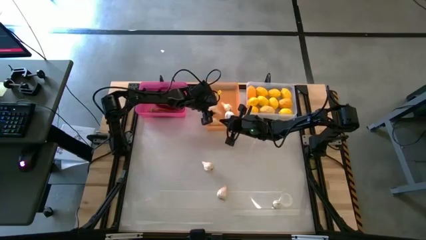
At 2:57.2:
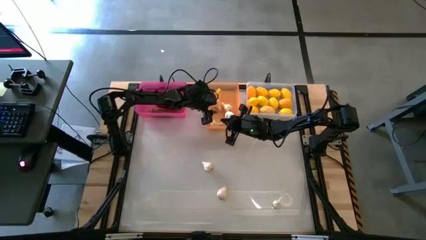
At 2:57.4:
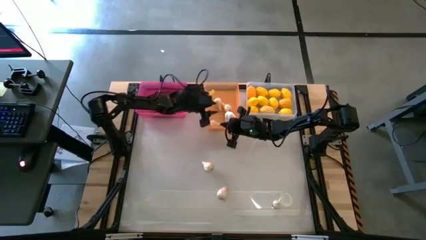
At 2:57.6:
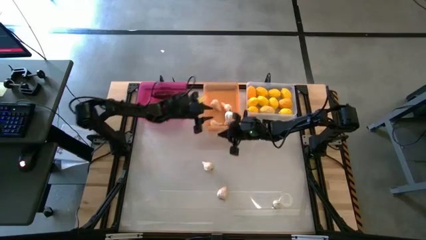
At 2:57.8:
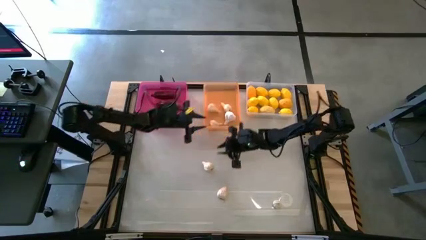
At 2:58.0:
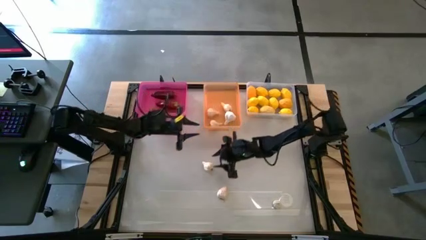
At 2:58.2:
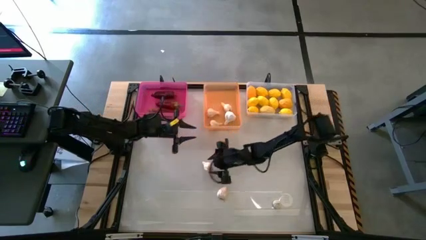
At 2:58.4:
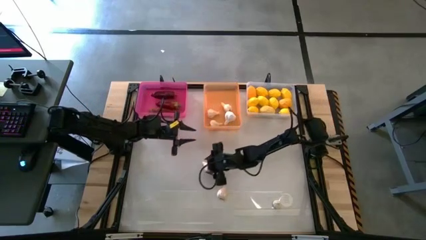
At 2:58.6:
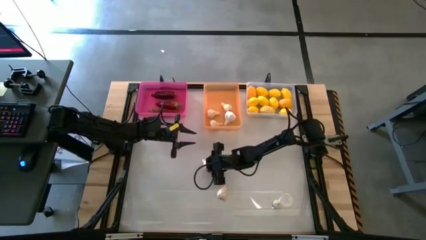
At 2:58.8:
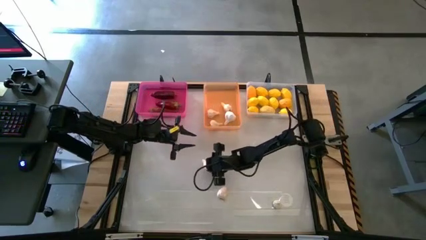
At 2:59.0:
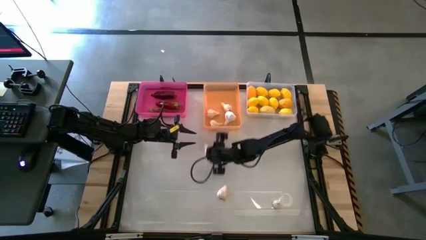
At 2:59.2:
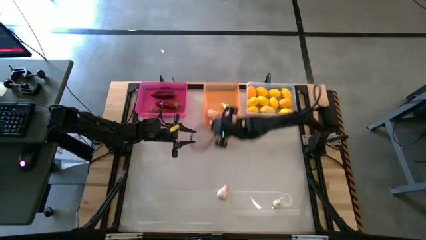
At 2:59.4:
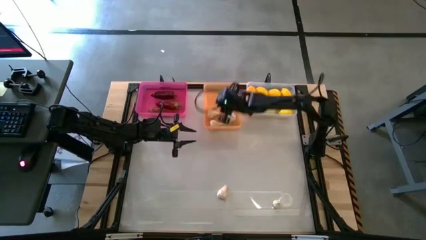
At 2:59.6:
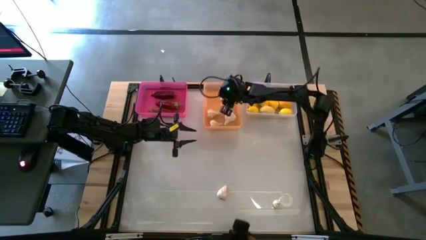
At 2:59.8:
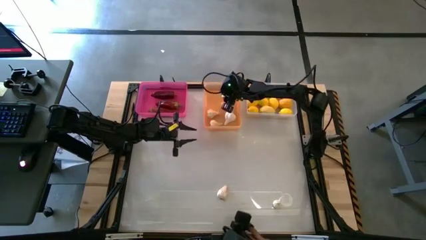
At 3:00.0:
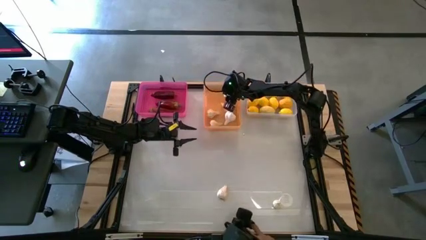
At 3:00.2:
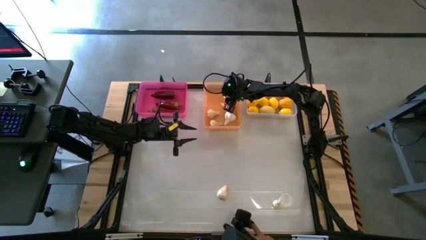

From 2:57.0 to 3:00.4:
Task: Sort produce into baskets
Put the white garlic into the orange bin

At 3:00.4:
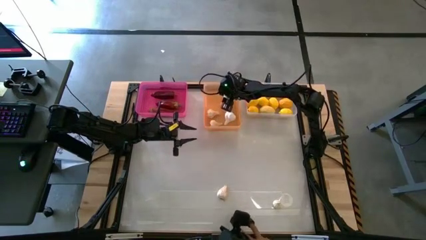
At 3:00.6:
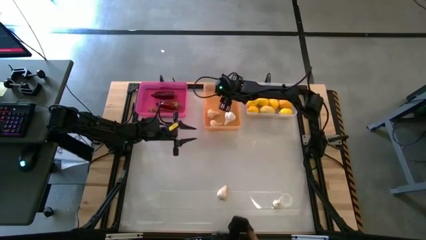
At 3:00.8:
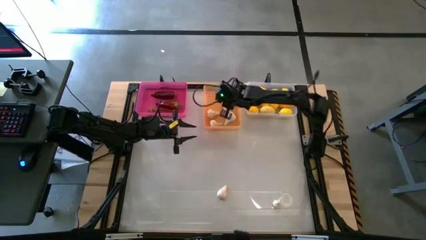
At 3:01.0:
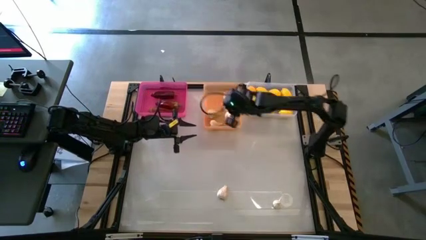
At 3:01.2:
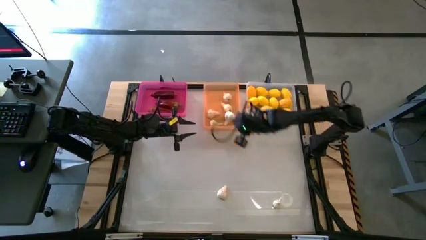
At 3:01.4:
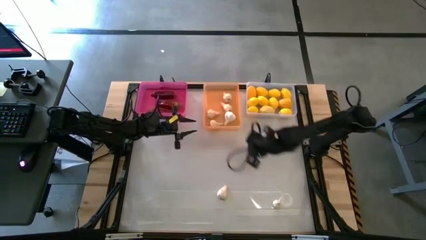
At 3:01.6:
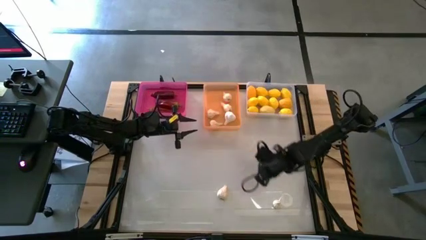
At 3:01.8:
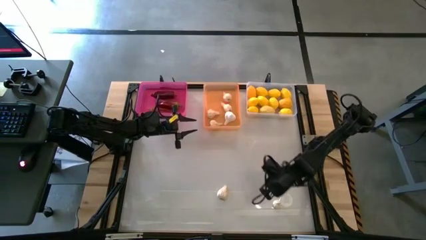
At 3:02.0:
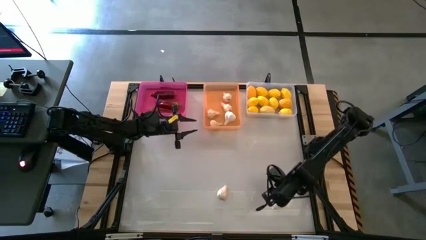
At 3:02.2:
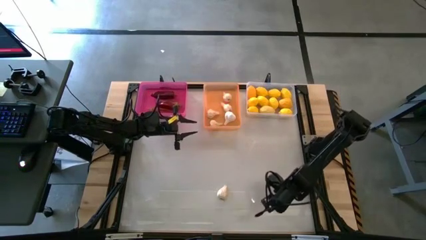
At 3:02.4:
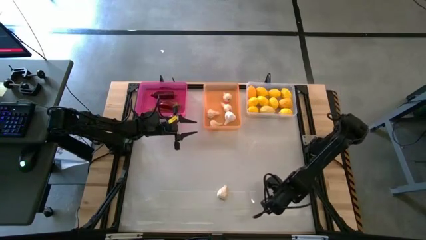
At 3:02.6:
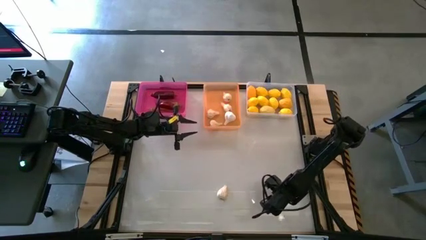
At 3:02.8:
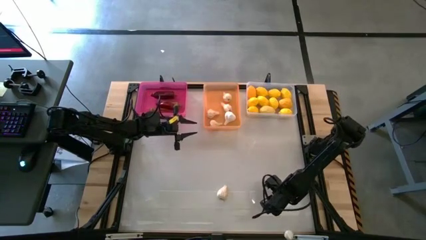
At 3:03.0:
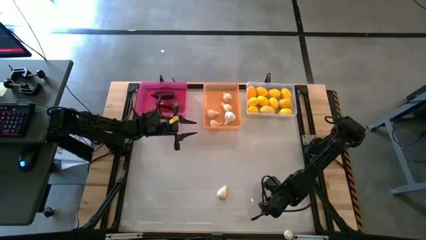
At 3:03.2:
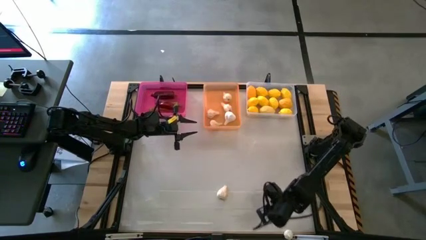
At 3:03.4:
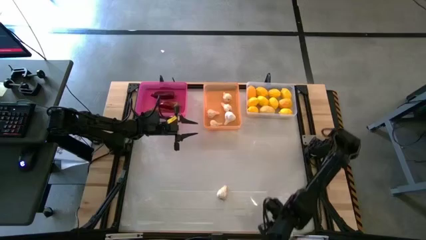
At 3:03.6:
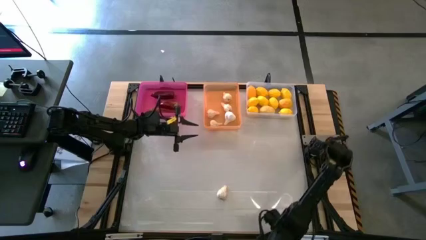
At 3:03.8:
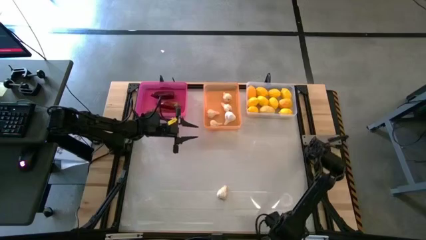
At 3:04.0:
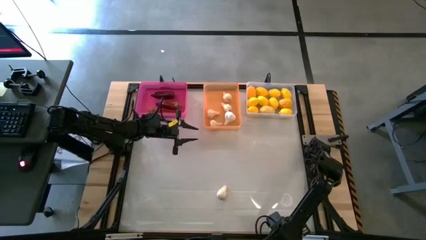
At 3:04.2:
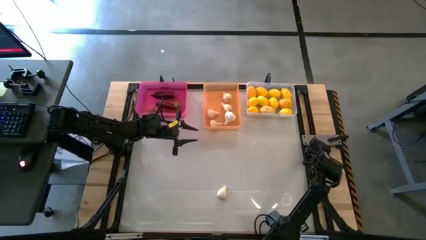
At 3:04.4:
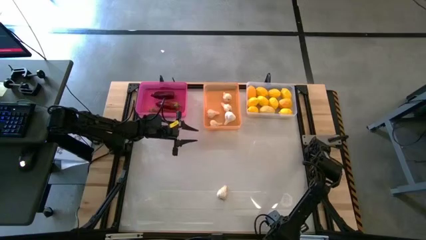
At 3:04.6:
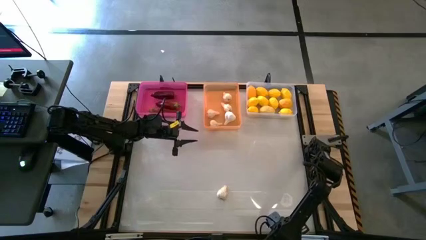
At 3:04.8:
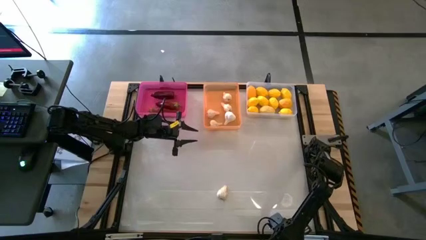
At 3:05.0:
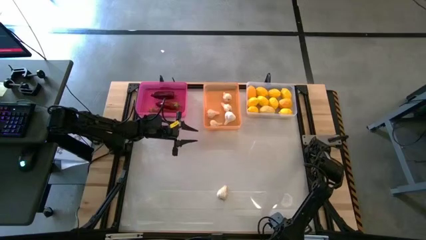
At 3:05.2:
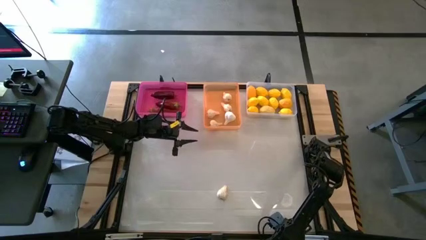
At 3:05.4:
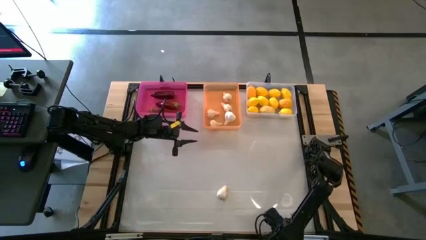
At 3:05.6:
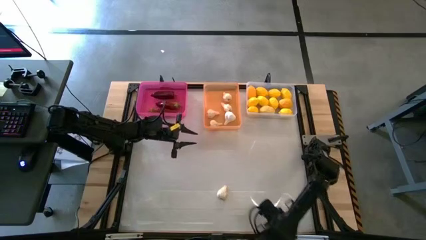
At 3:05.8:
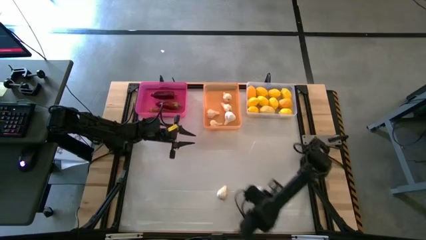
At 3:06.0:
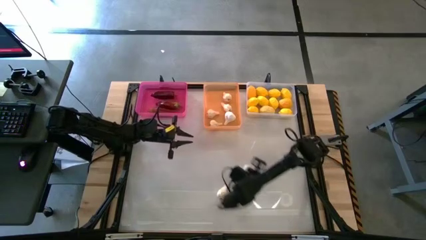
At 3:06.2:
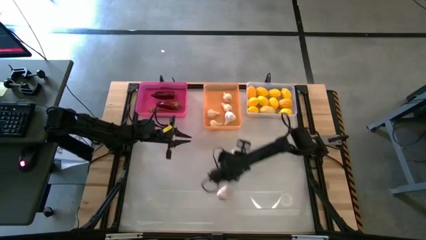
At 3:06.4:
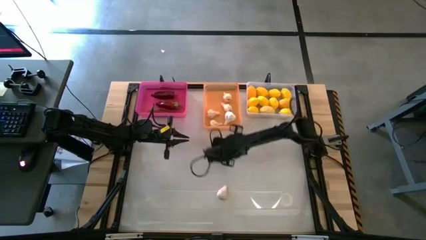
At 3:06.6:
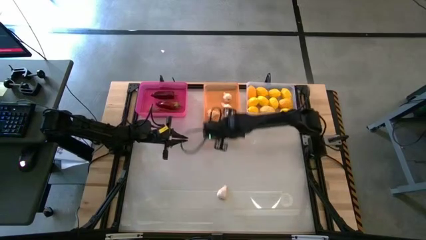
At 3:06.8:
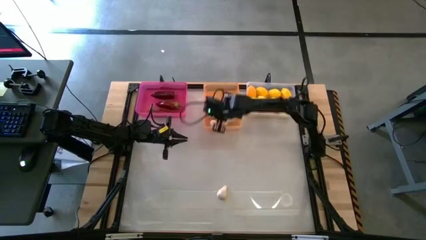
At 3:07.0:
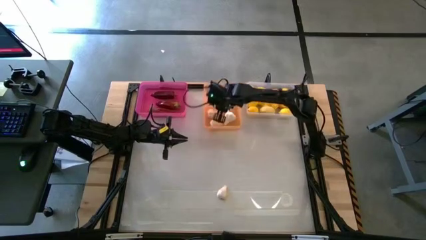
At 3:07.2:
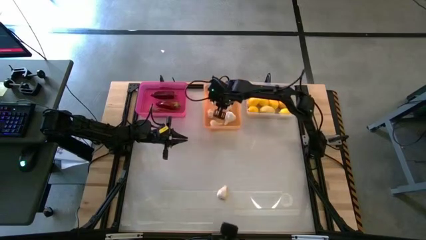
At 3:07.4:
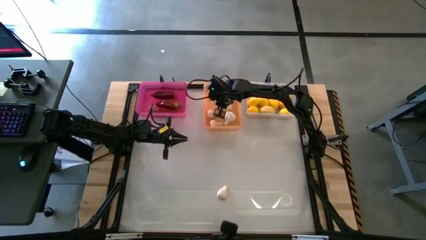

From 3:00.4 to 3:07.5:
Put the white garlic into the orange bin

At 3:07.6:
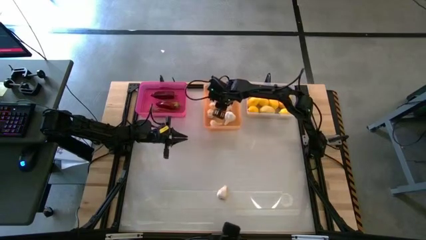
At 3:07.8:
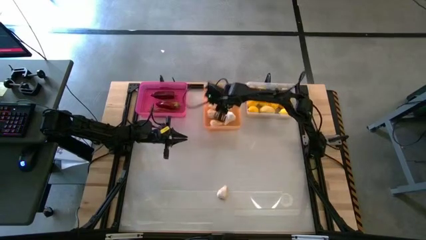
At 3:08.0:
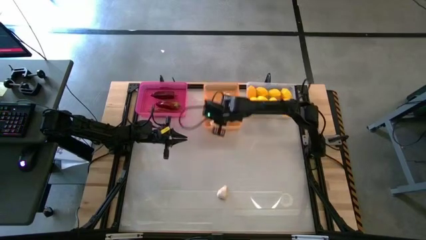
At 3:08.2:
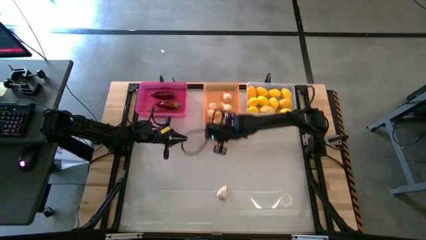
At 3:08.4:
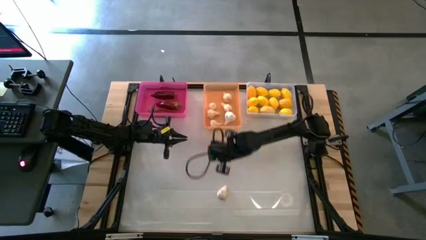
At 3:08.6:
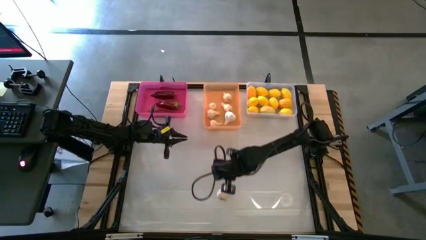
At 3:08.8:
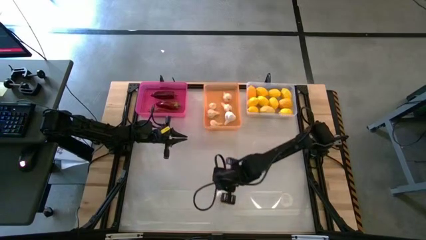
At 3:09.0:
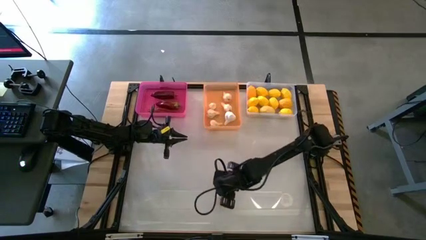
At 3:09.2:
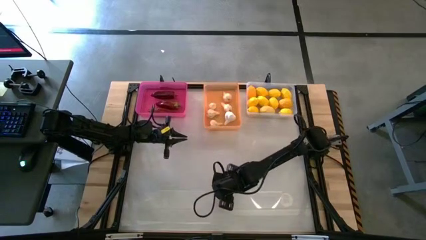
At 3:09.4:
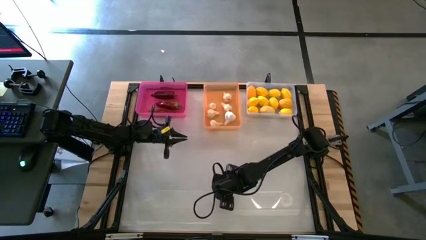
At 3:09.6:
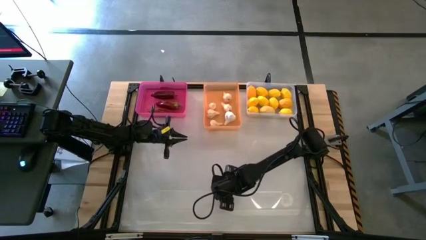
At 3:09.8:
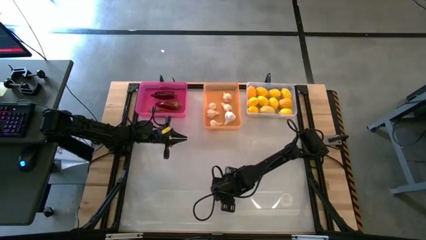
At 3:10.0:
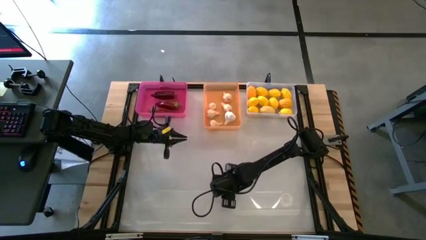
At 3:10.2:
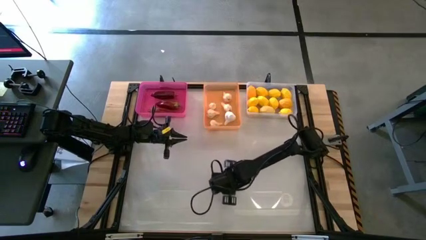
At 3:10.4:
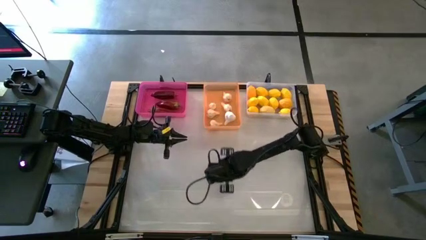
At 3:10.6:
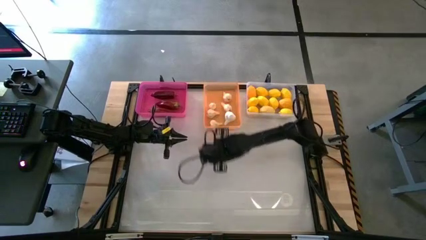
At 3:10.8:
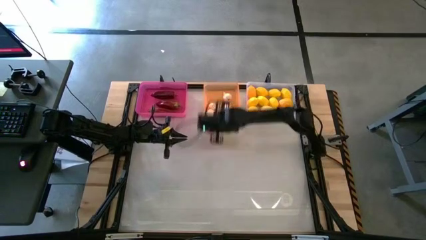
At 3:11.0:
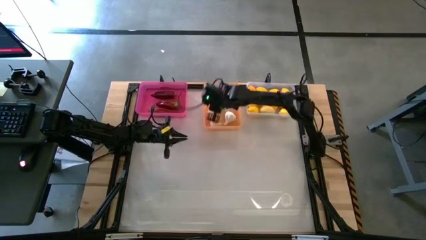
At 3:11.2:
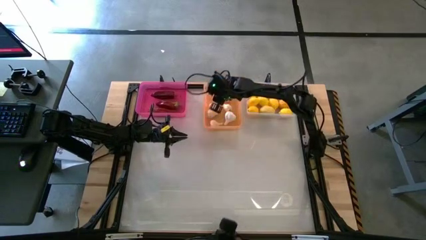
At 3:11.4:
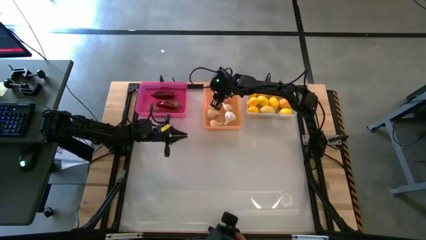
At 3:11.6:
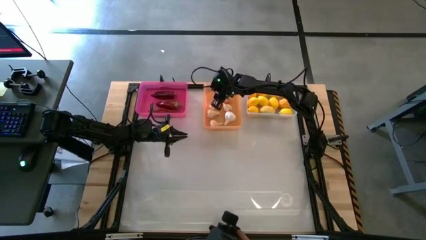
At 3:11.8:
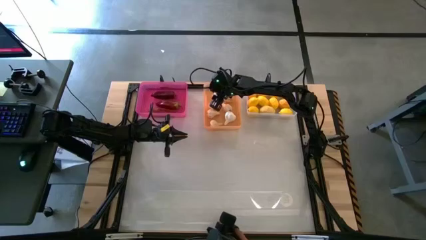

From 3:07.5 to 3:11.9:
Put the garlic into the orange bin

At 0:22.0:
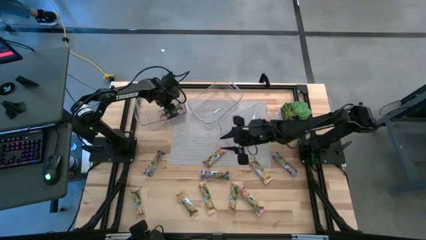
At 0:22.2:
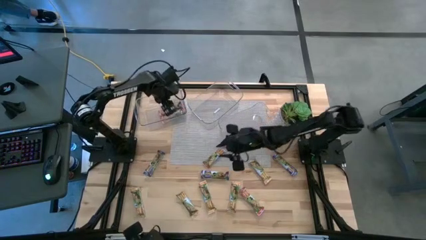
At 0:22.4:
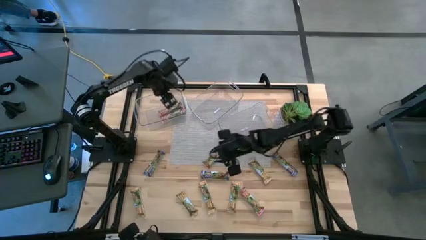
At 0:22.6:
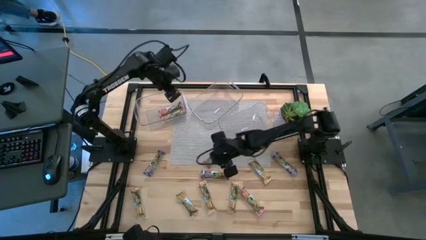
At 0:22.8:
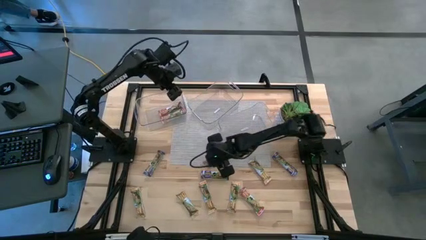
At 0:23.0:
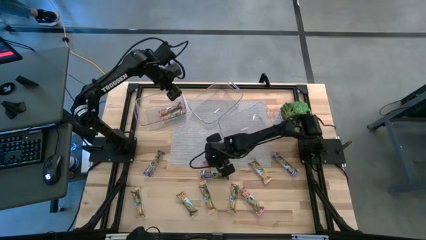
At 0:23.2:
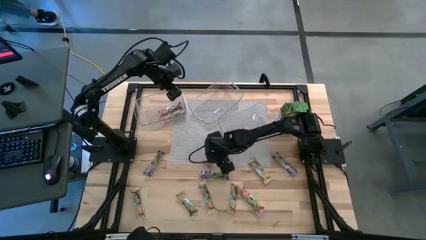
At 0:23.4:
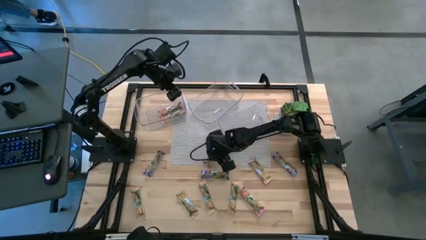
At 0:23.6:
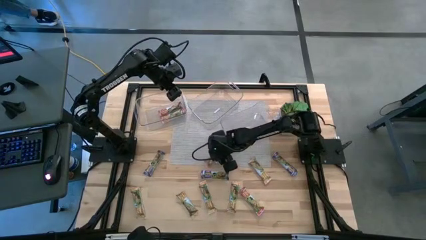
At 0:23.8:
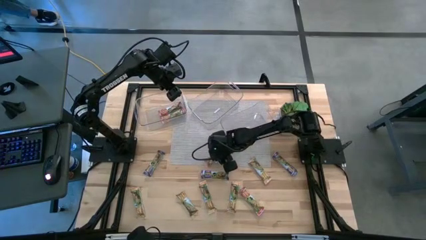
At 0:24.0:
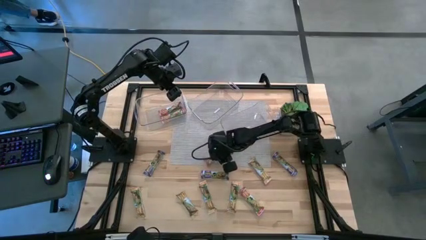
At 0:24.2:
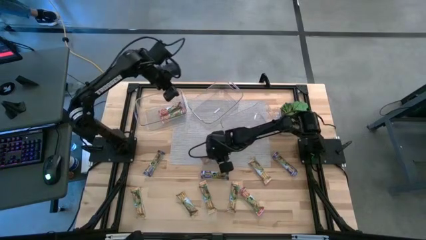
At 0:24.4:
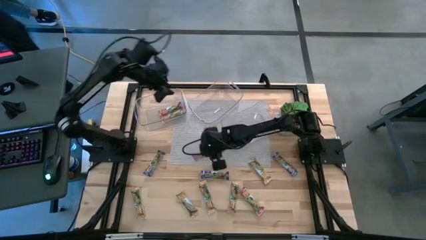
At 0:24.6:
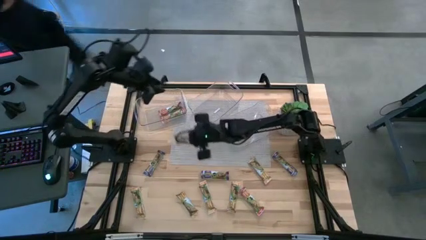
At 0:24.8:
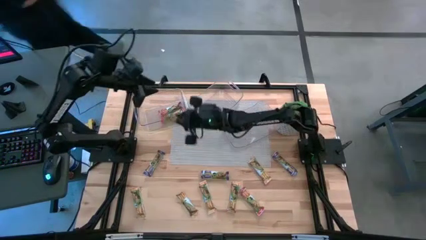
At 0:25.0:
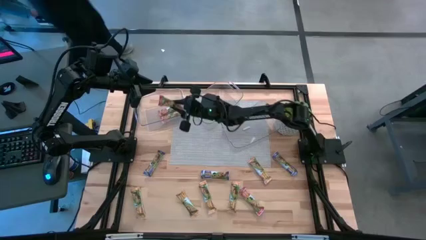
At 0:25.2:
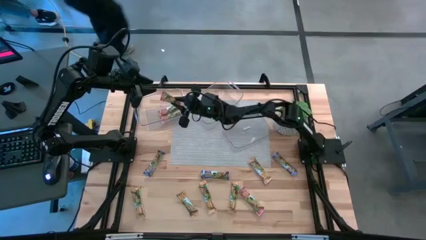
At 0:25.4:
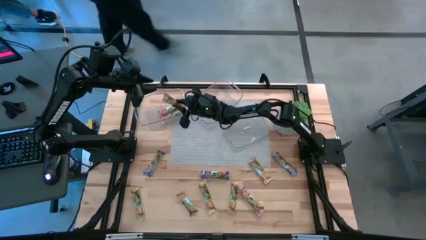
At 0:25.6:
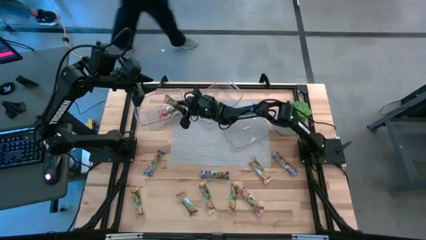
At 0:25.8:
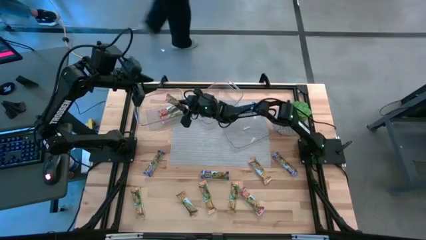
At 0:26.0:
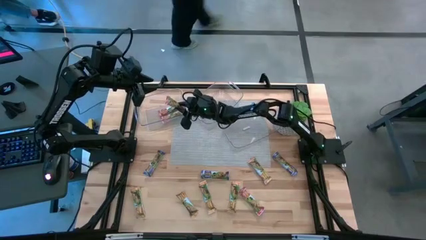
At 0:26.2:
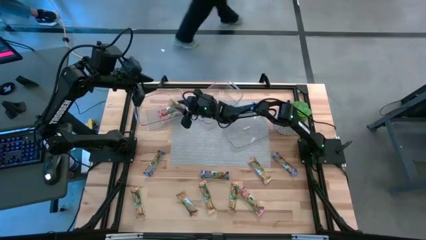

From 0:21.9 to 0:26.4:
Task: Pick and place Granola Bars by type
Put the red granola bar into the left transparent bin
